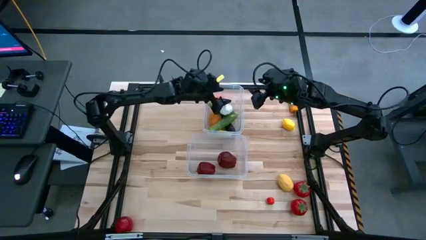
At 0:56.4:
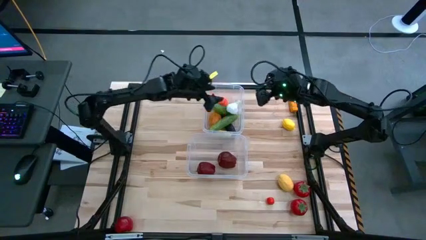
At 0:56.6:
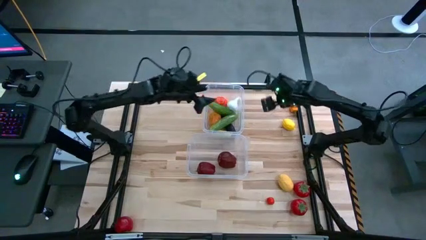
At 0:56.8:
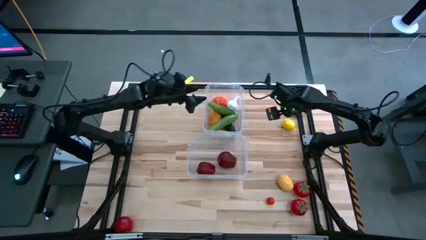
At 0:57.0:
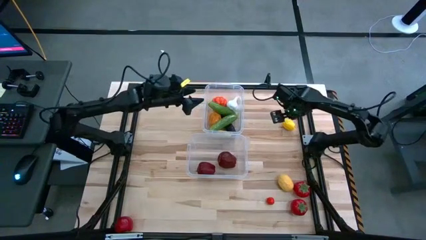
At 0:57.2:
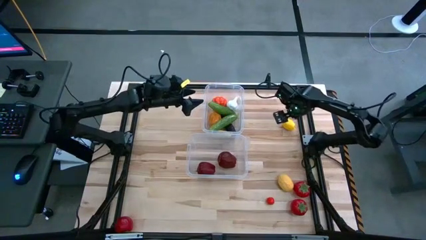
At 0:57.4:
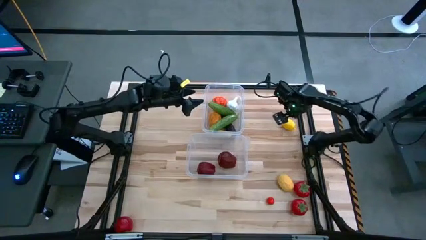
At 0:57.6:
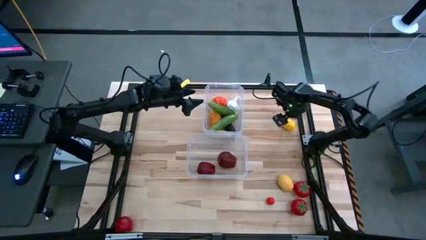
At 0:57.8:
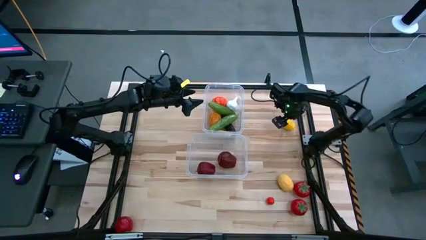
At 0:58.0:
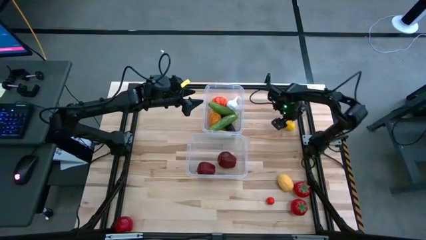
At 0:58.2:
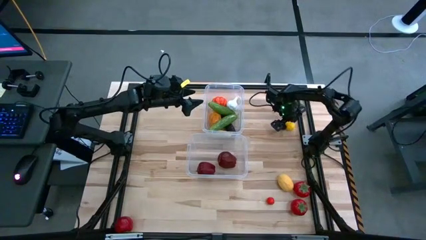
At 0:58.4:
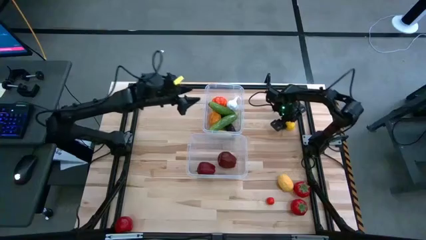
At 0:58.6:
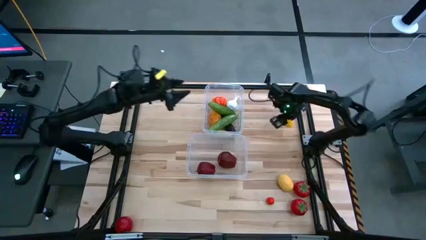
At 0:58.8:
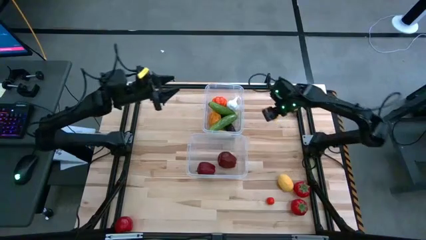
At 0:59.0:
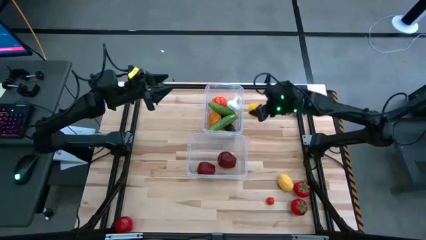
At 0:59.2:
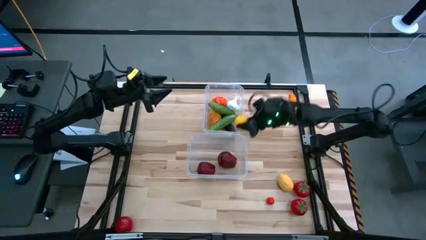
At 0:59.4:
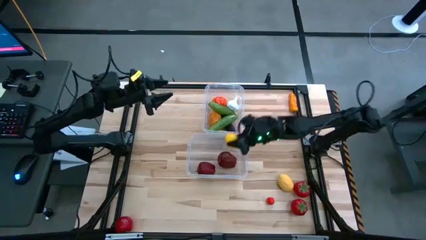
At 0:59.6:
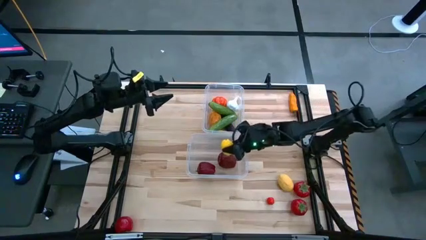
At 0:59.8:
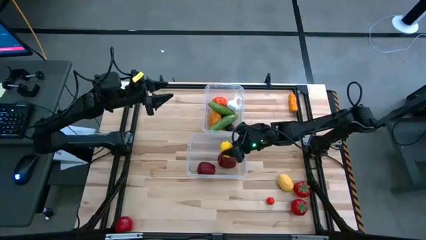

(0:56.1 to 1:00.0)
Task: Sort produce into baskets
Put the yellow lemon into the bottom transparent bin

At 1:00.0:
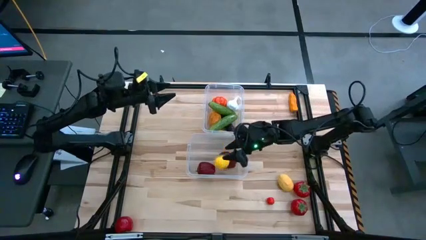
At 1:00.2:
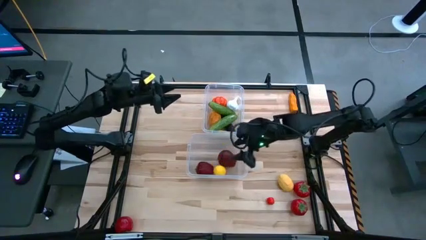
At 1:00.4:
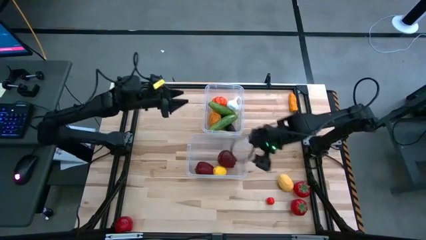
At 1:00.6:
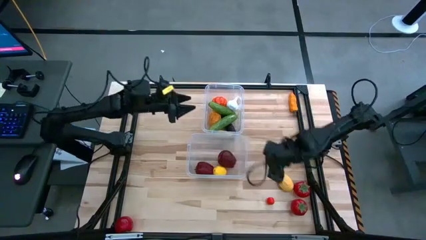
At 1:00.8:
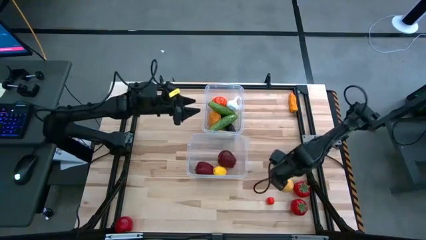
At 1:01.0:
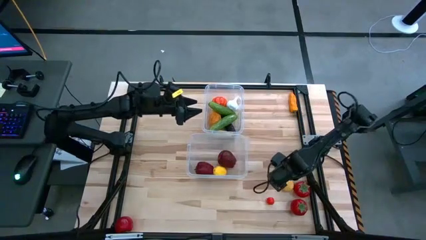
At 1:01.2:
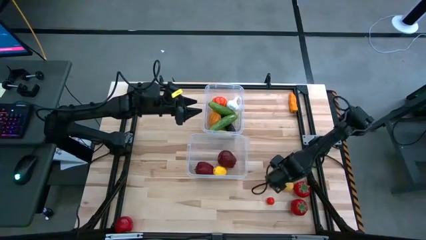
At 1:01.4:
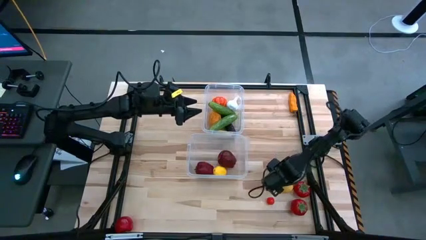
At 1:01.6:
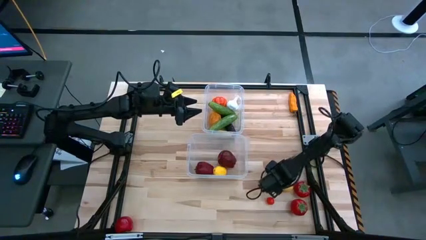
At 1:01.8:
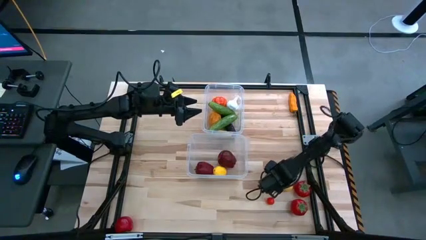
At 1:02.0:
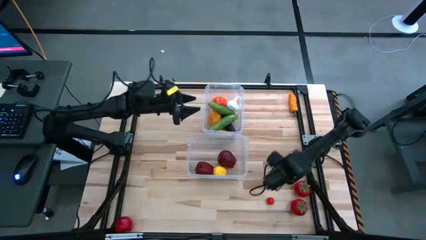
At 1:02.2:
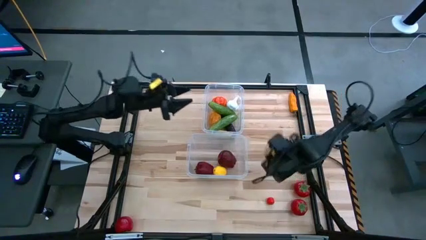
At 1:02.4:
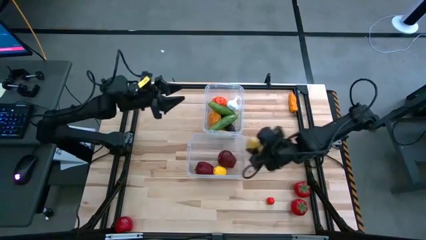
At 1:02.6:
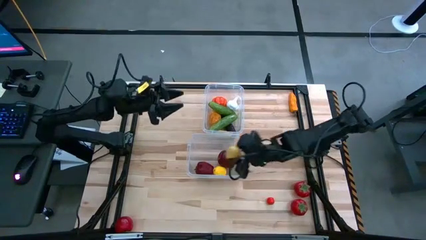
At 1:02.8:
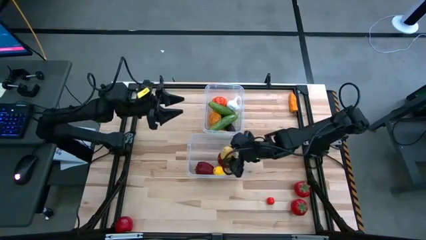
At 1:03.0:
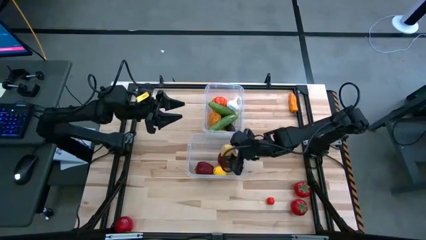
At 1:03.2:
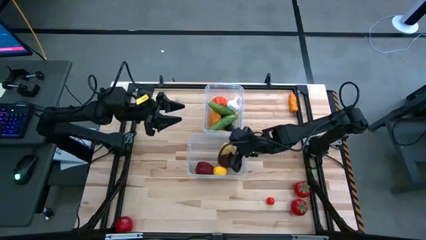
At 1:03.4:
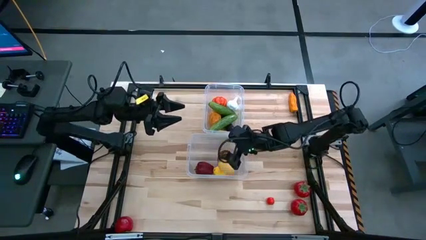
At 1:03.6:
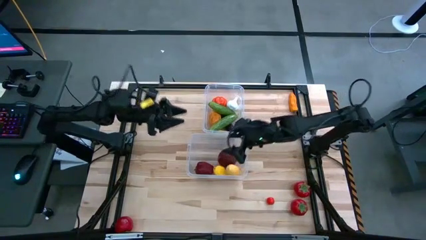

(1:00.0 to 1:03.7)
Put the yellow lemon in the bottom transparent bin

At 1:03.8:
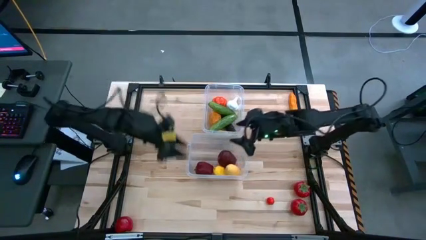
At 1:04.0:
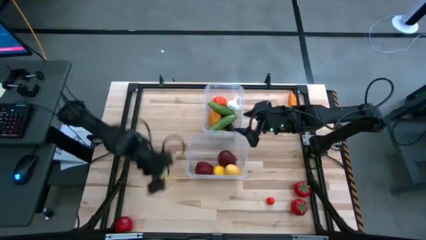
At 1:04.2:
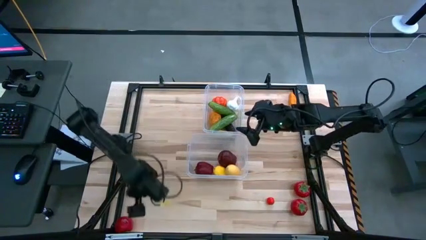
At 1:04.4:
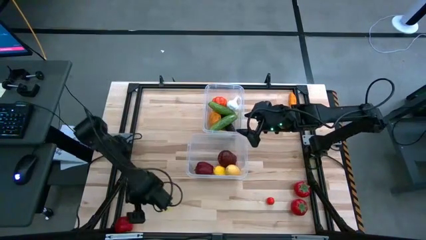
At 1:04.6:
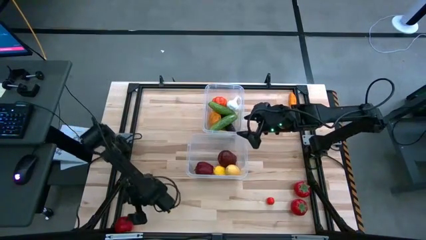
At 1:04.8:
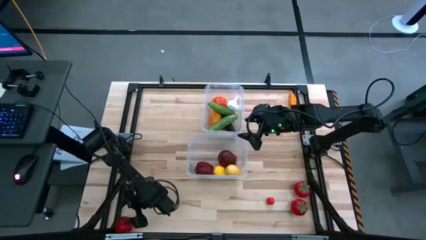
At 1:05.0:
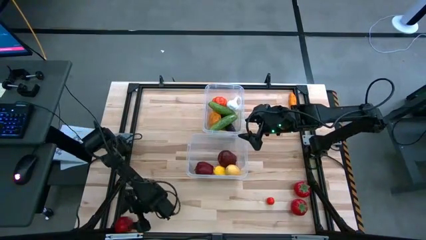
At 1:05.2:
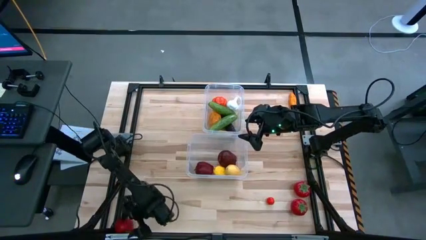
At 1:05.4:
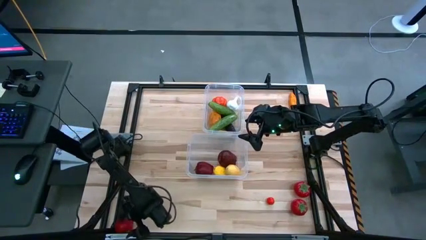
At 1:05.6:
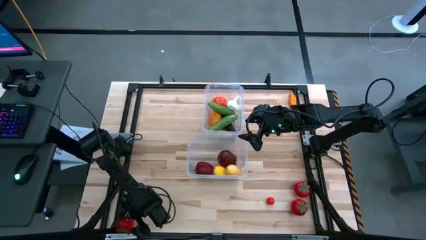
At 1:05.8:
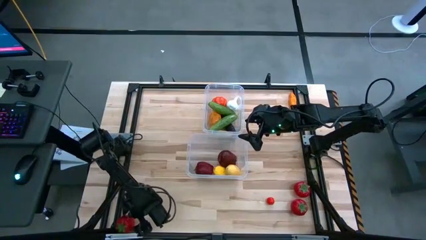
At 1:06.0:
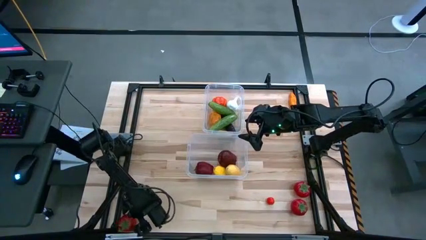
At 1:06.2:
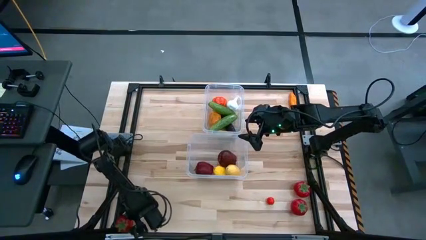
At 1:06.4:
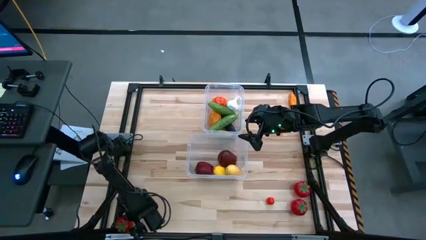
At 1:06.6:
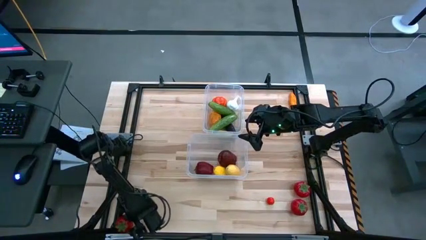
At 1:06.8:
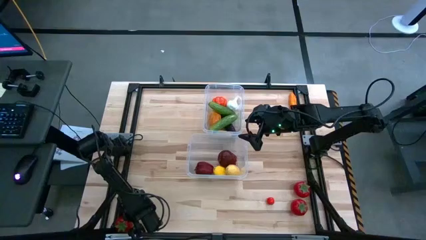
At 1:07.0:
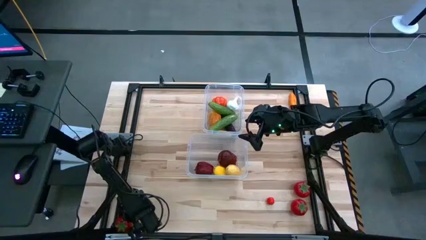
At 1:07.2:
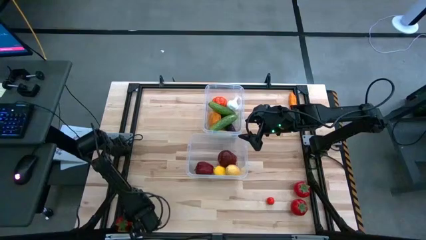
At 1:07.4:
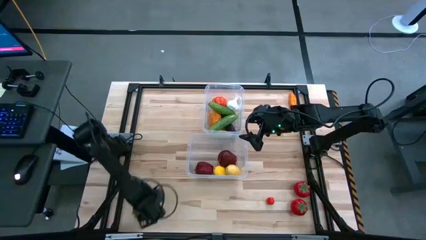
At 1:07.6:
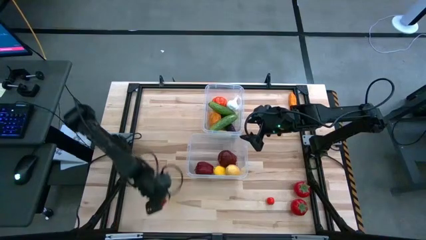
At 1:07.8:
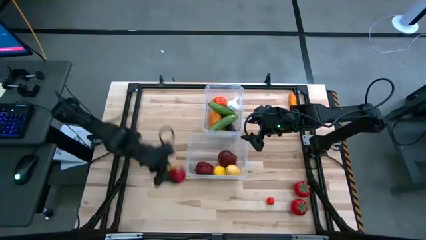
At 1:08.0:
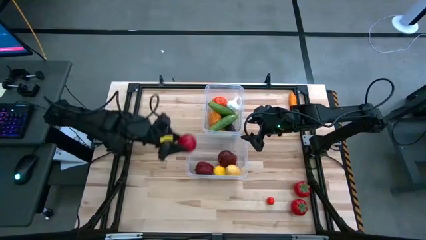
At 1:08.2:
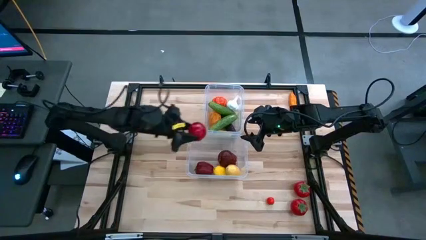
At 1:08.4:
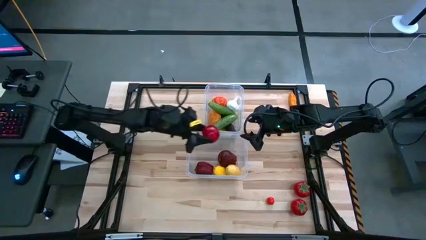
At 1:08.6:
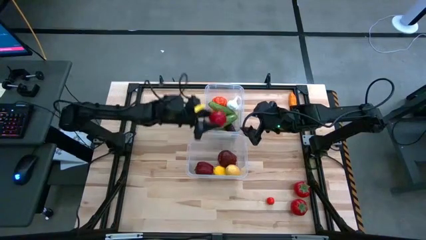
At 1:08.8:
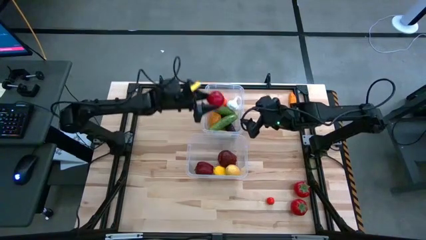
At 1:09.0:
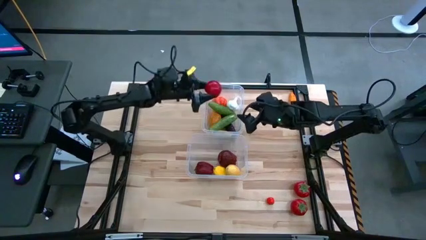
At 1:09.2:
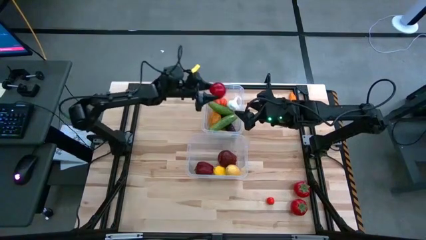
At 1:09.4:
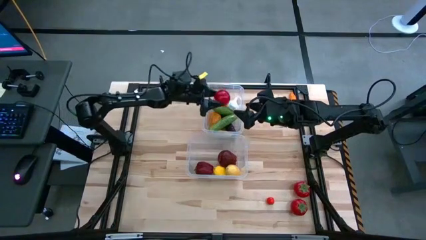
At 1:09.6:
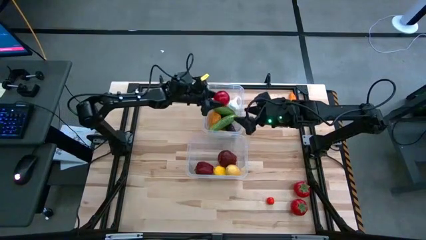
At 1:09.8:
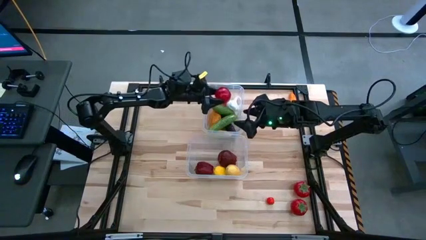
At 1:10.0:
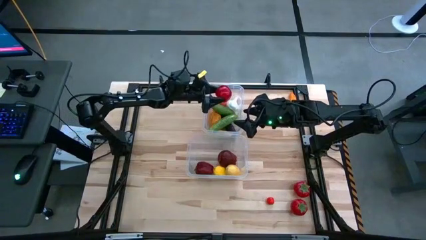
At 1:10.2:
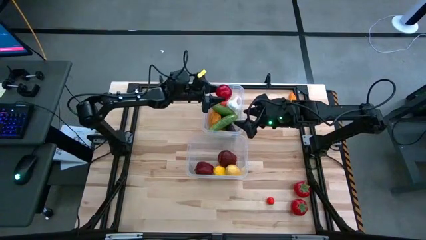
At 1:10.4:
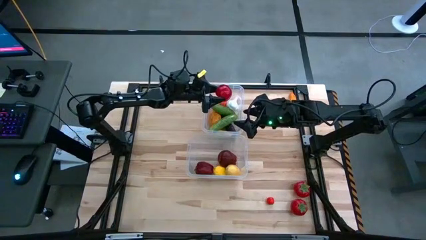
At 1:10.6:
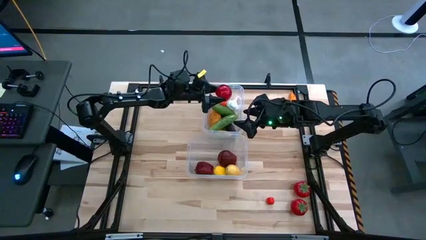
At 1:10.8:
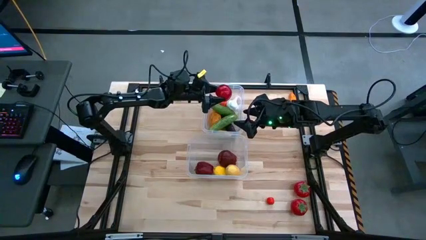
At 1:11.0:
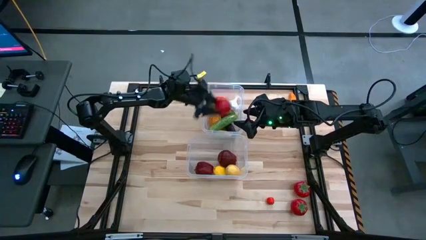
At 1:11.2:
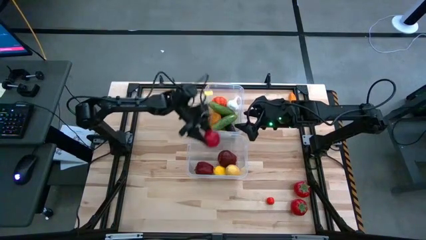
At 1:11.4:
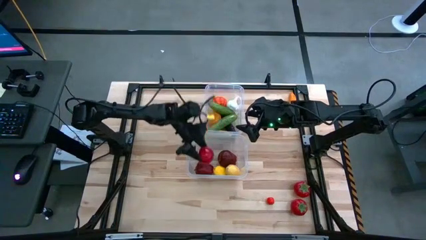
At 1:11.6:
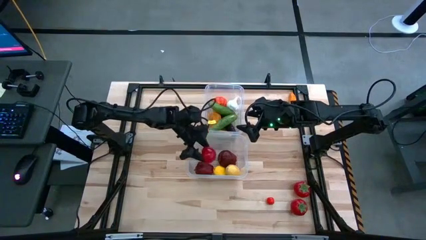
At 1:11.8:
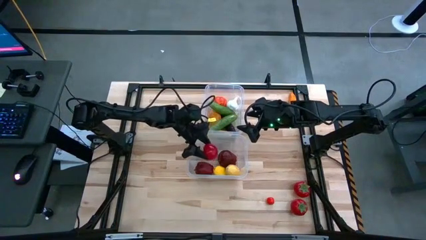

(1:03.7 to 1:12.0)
Put the red tomato into the bottom transparent bin
